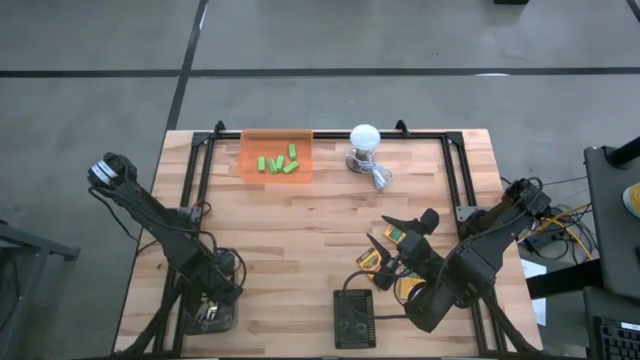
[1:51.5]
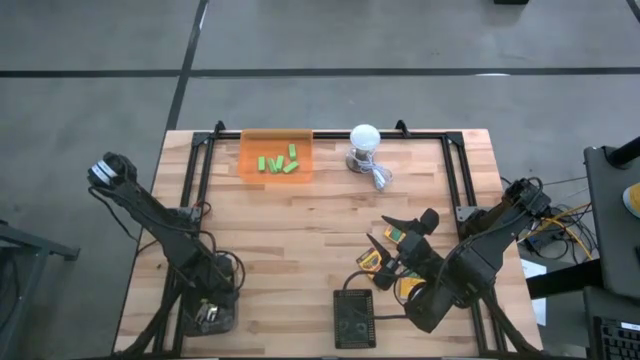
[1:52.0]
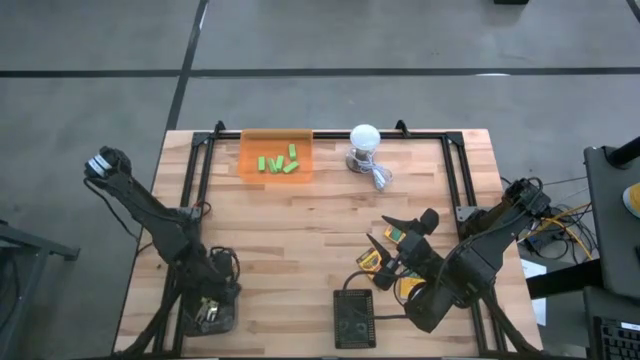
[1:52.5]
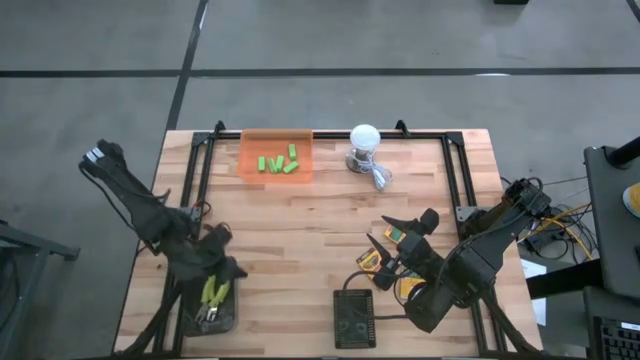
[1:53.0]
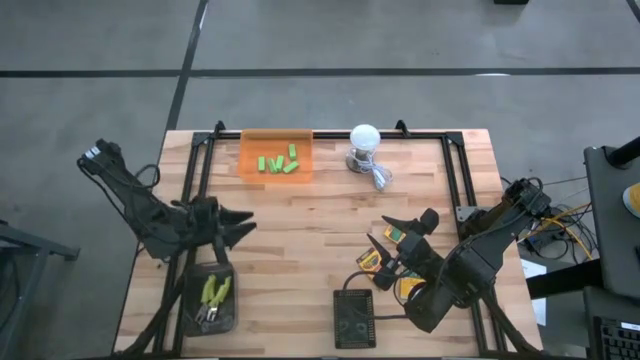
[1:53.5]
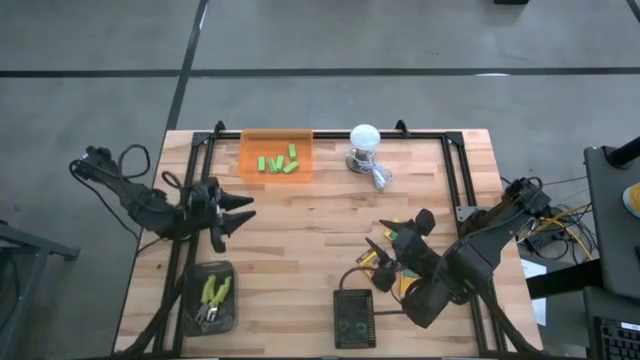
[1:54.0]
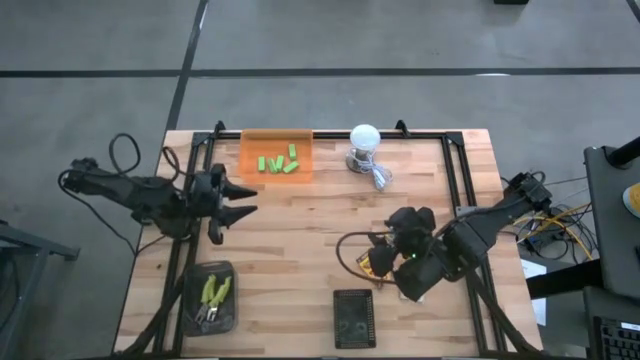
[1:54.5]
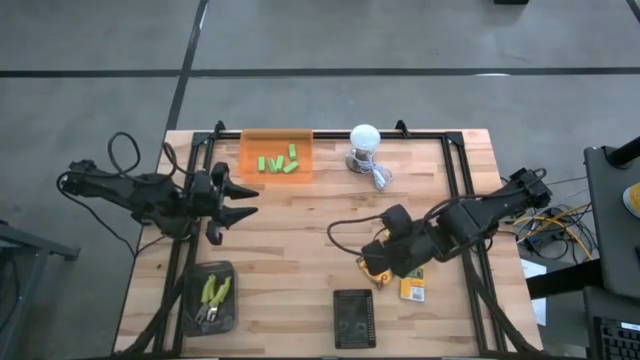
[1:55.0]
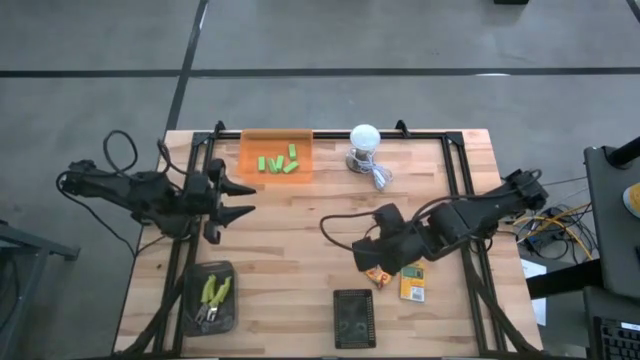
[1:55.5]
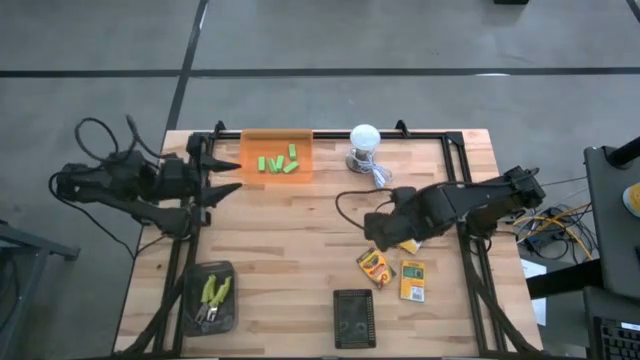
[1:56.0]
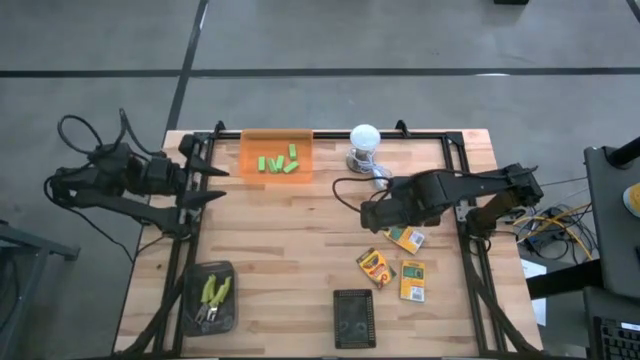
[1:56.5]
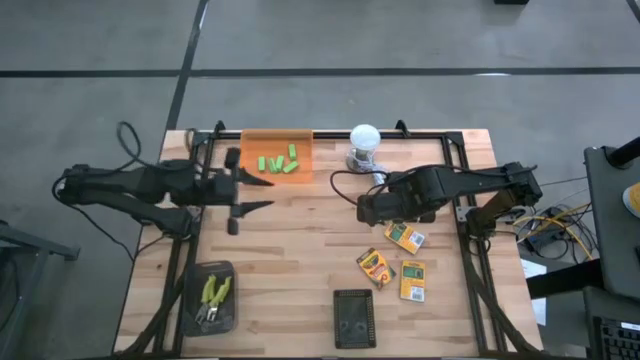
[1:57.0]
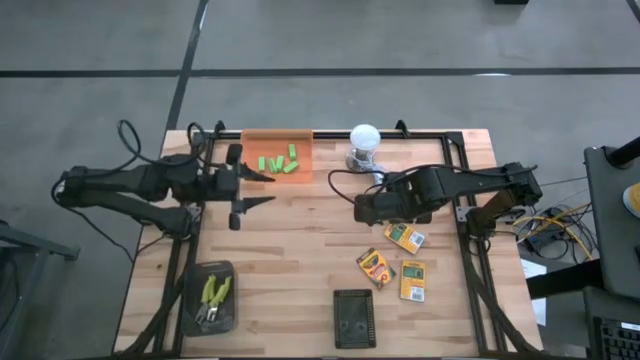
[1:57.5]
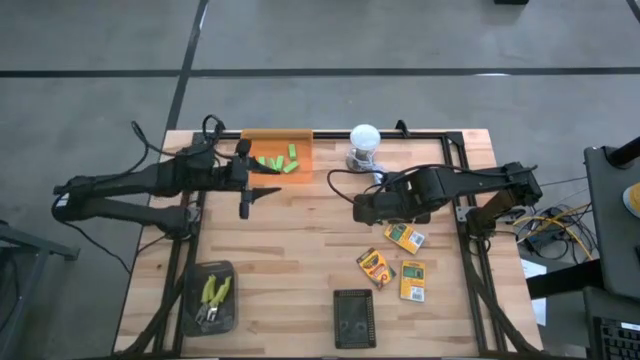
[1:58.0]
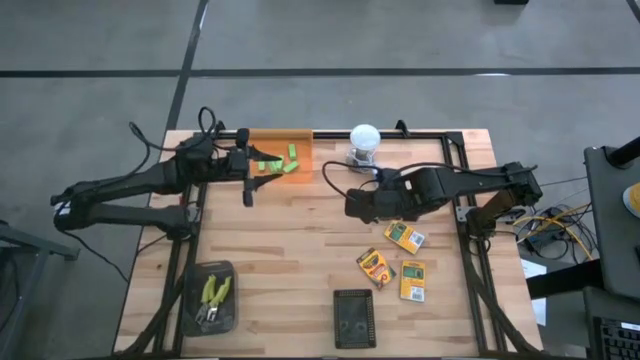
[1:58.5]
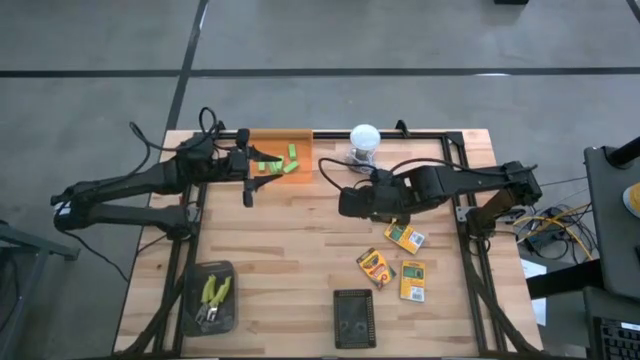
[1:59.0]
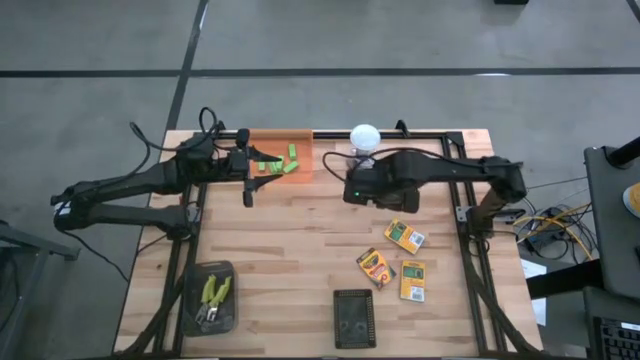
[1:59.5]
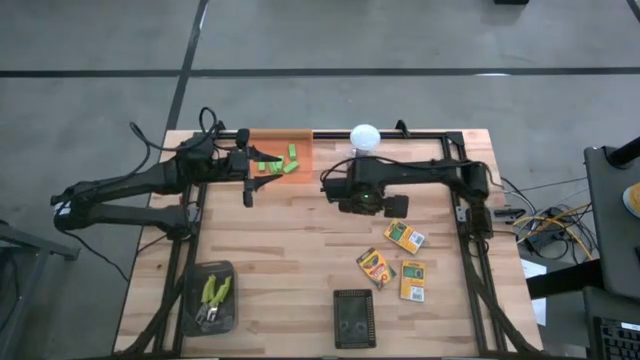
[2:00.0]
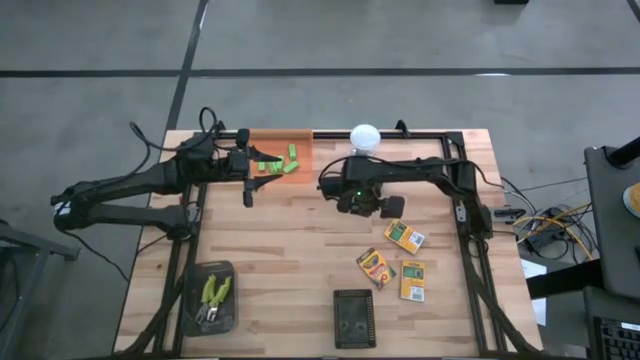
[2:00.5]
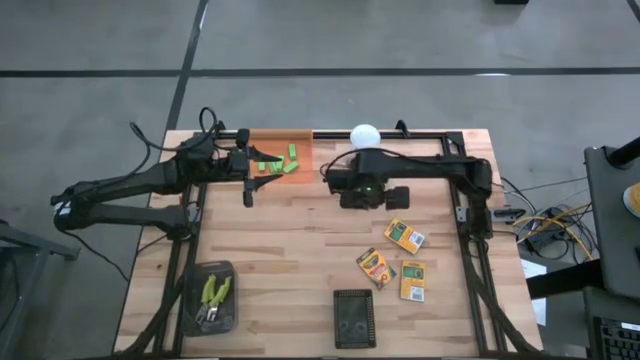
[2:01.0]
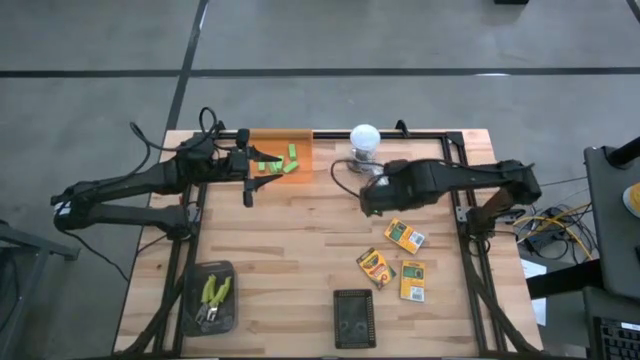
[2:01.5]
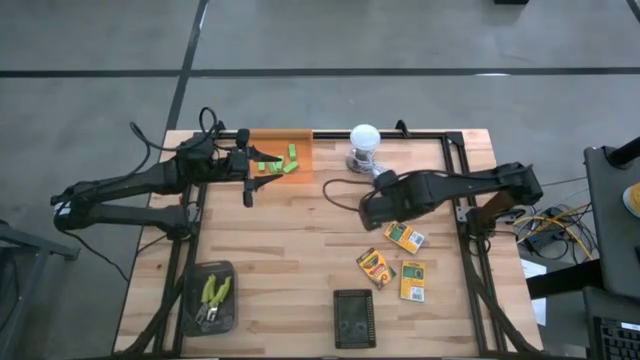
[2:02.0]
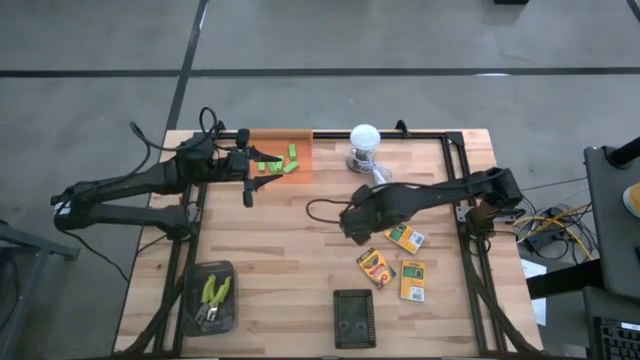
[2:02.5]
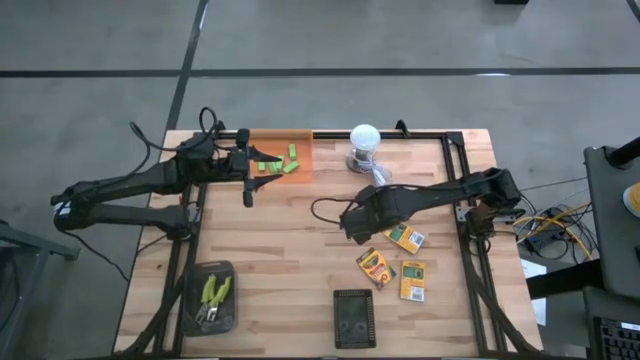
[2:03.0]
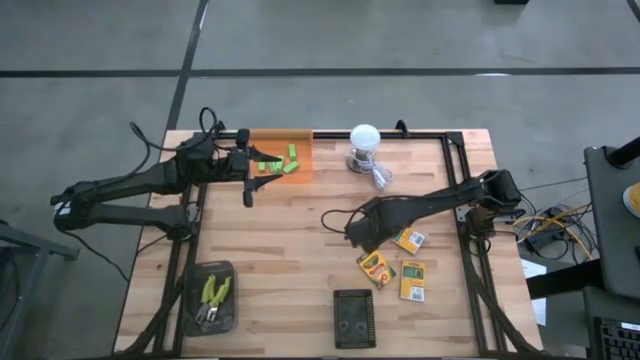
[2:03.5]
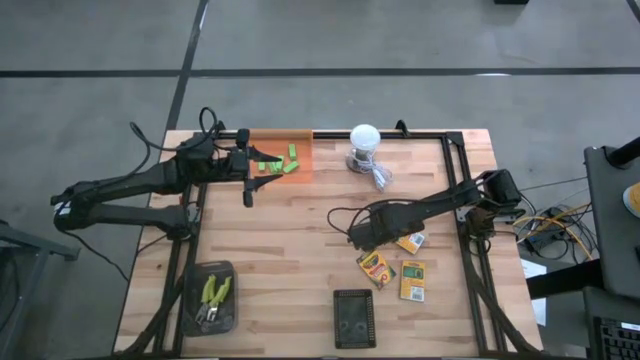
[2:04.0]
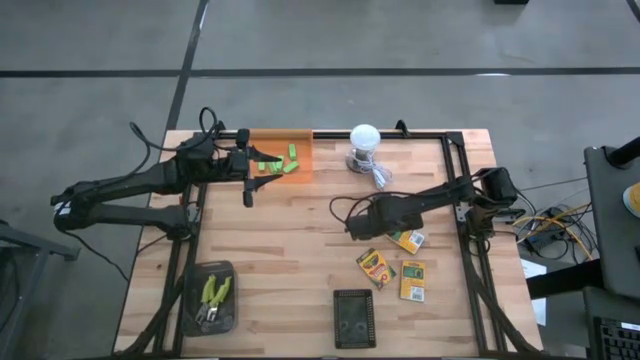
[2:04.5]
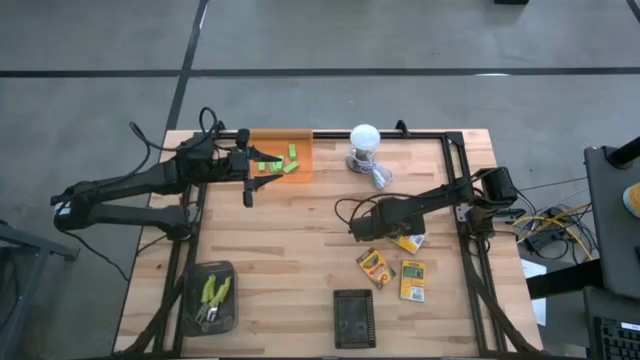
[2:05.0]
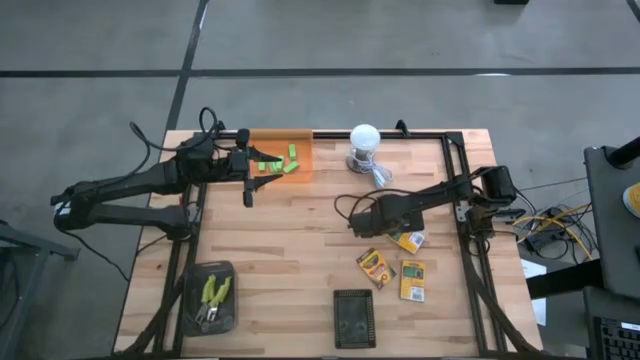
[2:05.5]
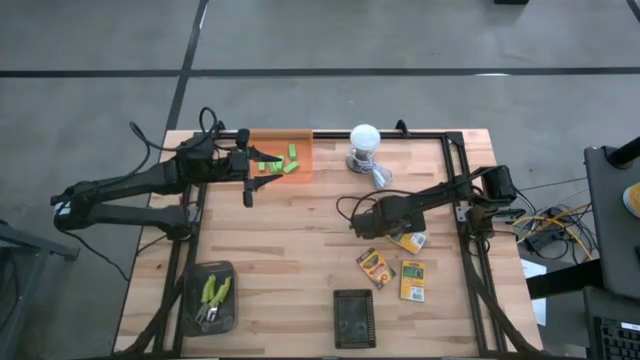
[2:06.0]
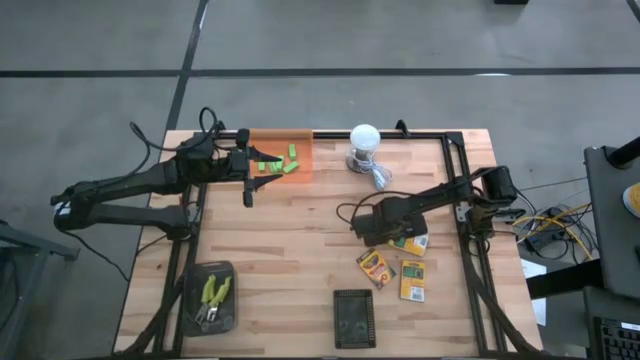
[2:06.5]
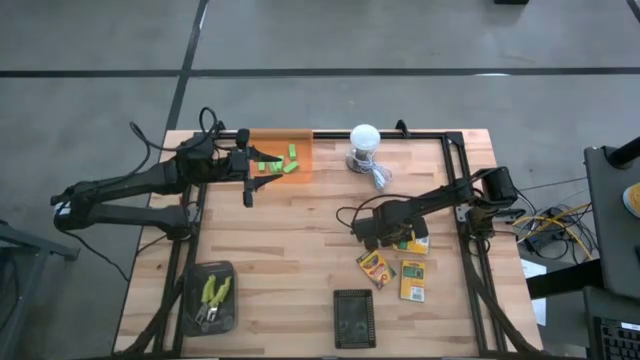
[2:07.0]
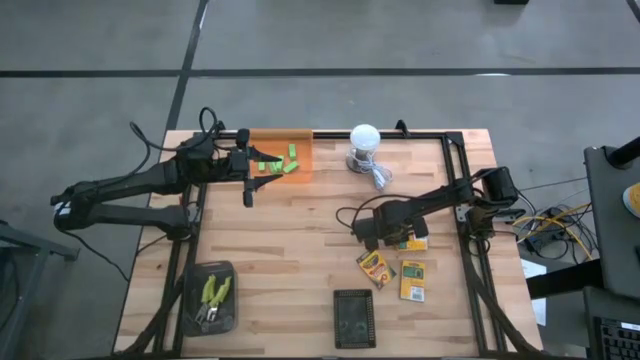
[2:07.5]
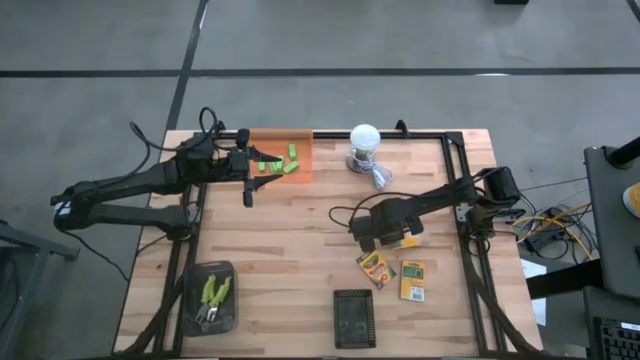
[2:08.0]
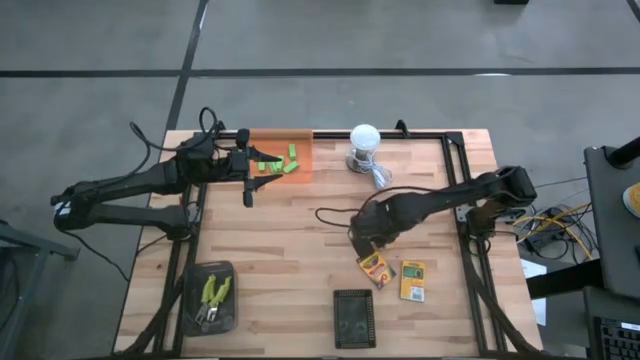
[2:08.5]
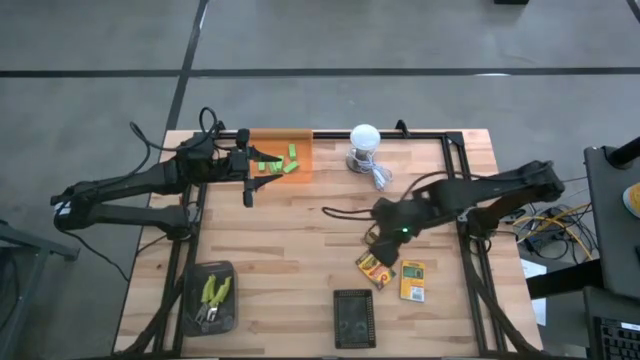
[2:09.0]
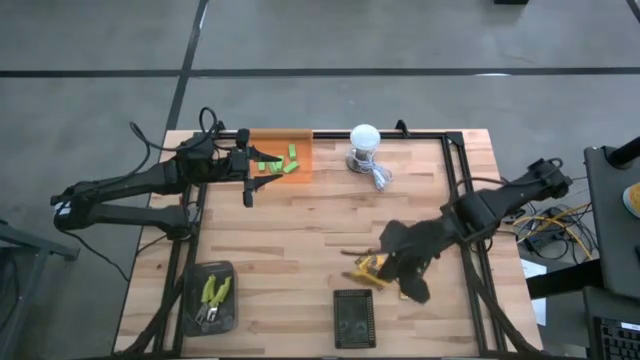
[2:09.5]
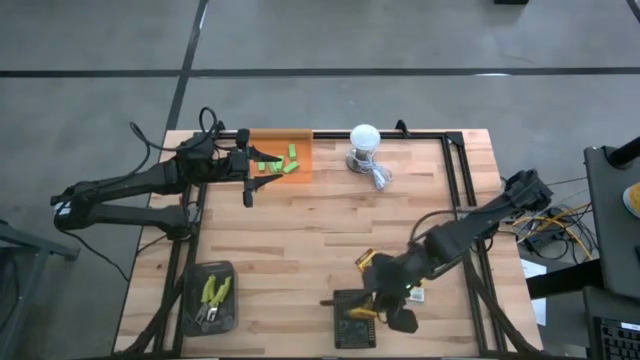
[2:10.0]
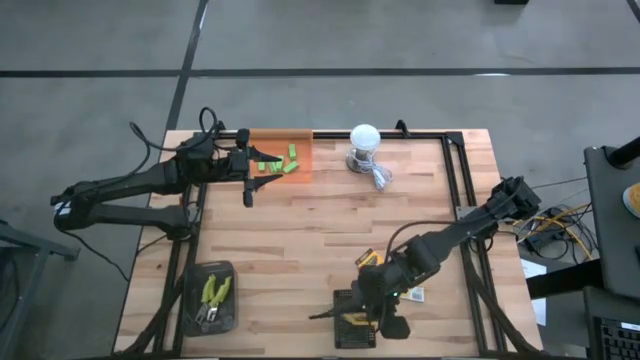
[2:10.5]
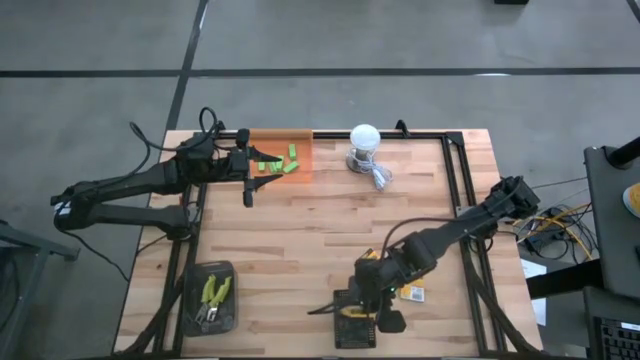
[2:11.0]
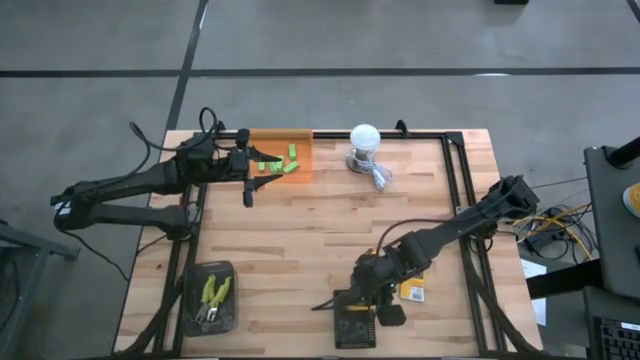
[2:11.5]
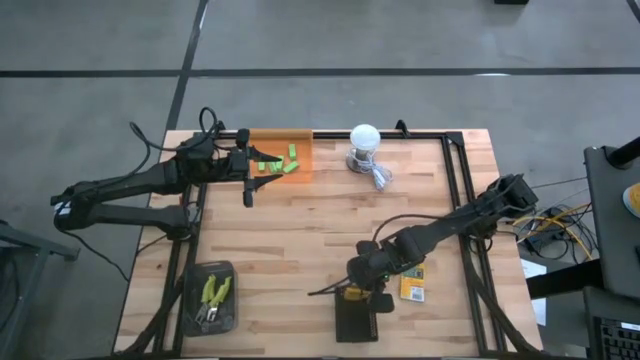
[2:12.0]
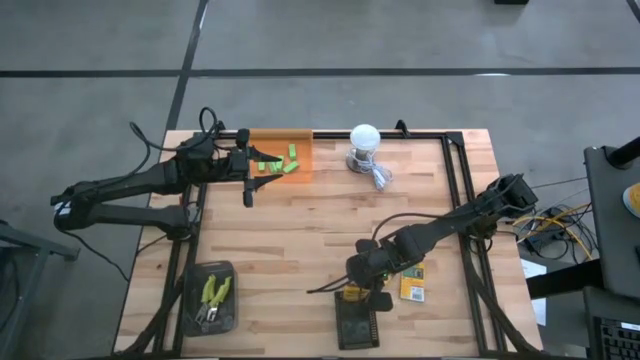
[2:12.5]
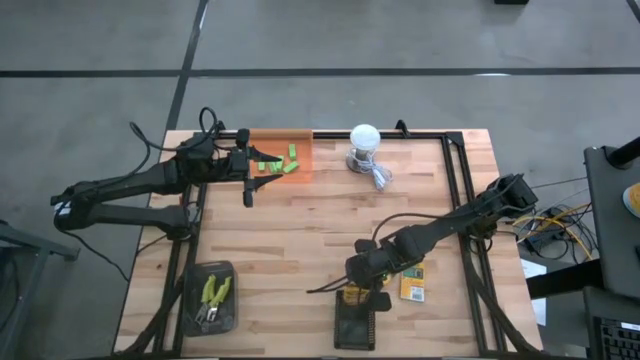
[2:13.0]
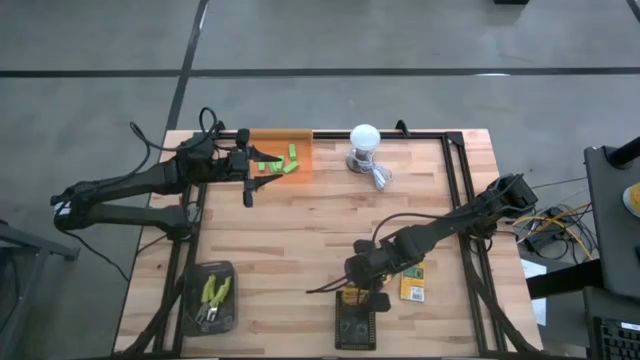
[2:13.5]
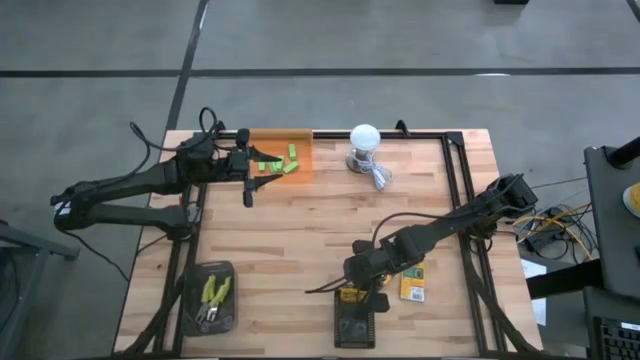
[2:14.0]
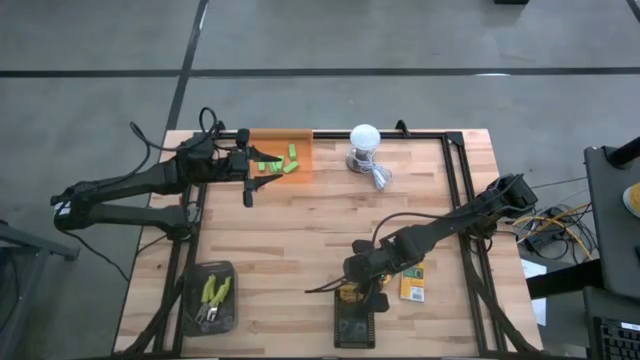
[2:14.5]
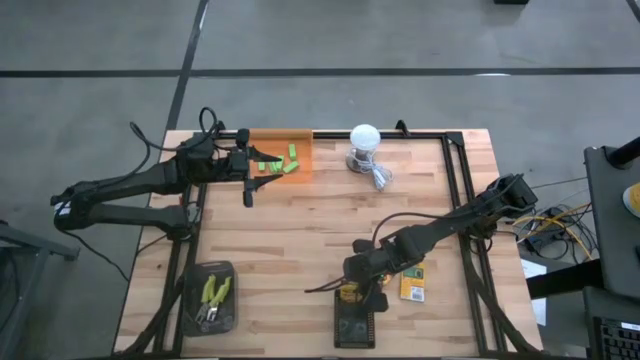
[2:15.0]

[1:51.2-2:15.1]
Task: Pick & Place School Supplies
Put the crayon box into the right black bin
